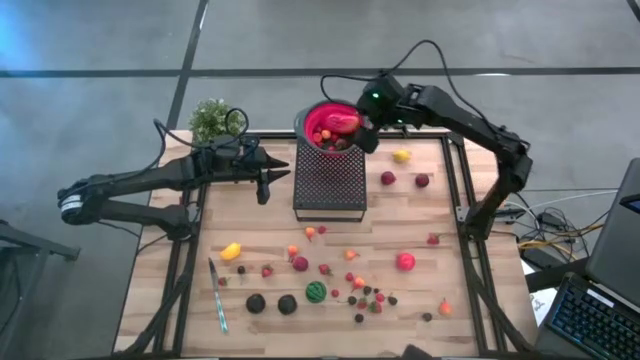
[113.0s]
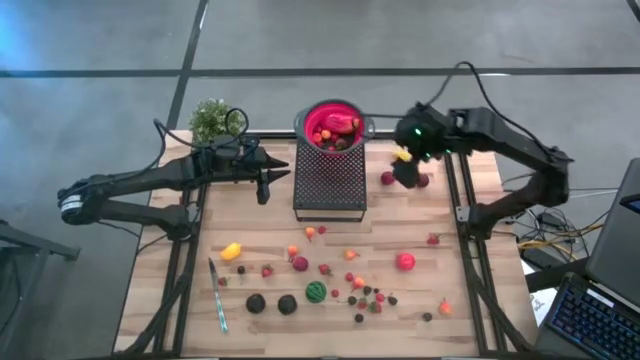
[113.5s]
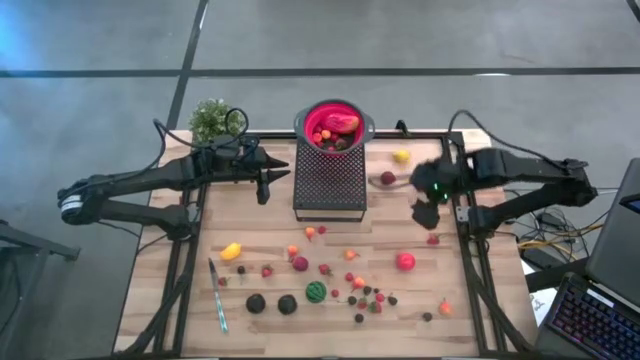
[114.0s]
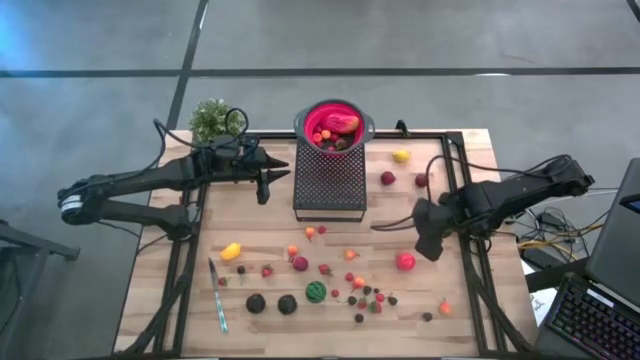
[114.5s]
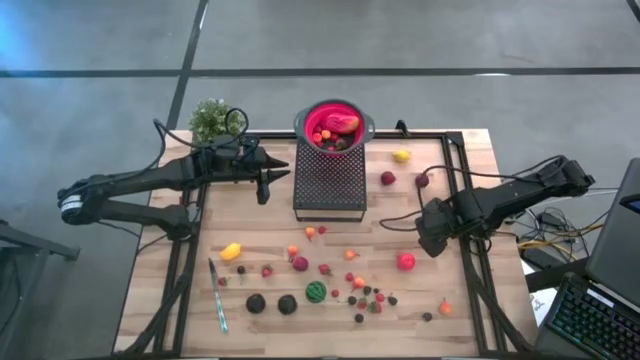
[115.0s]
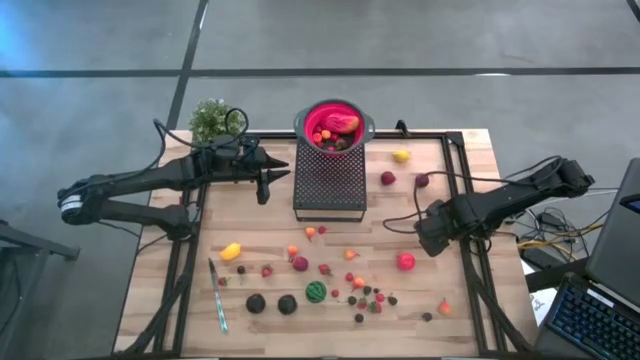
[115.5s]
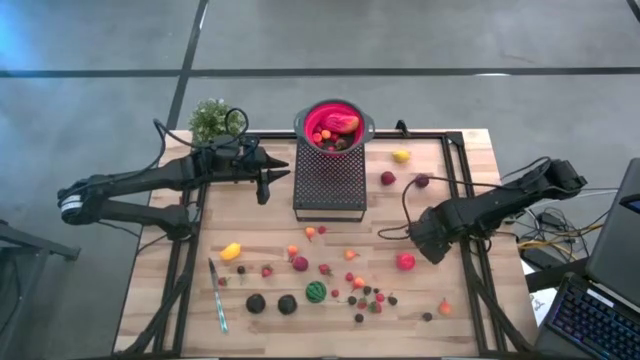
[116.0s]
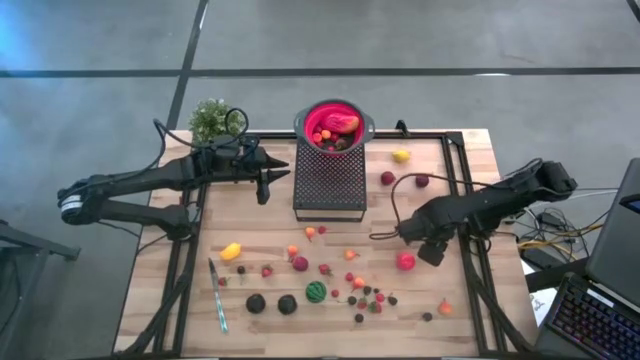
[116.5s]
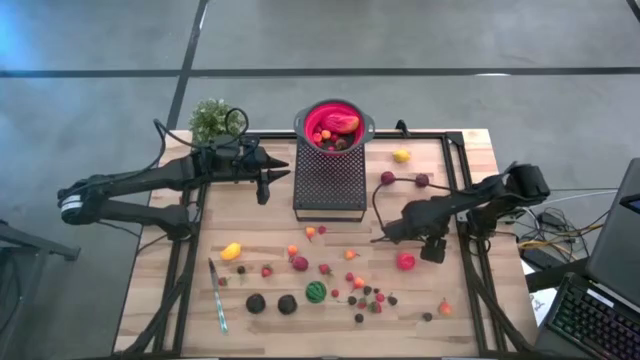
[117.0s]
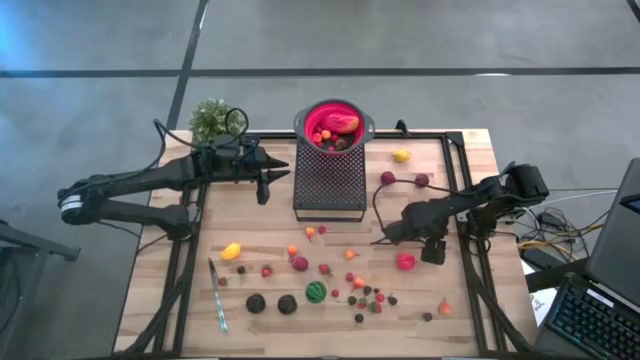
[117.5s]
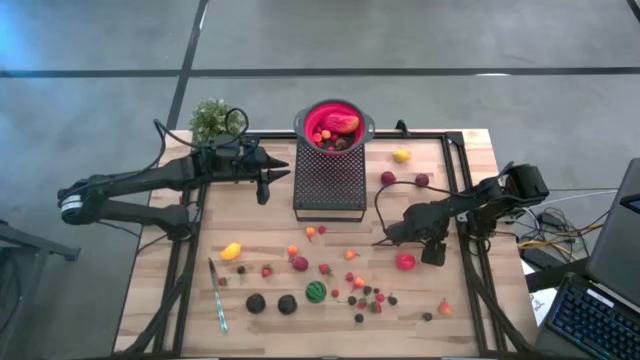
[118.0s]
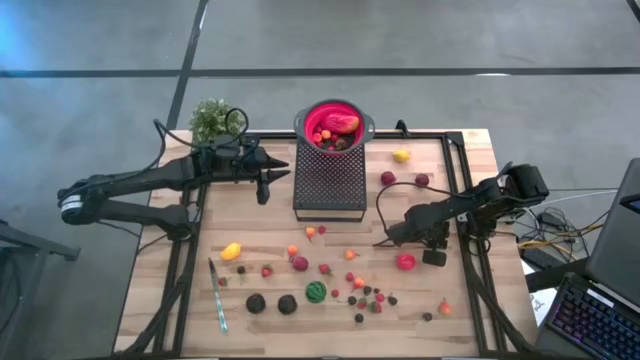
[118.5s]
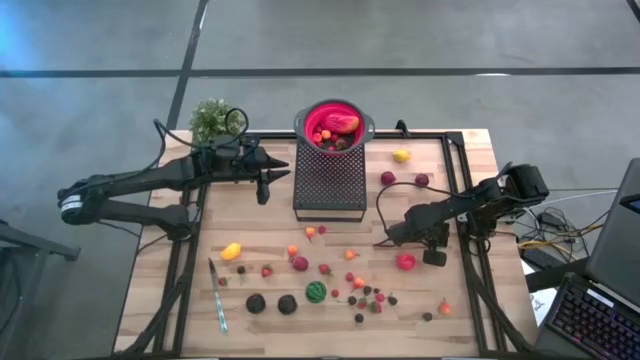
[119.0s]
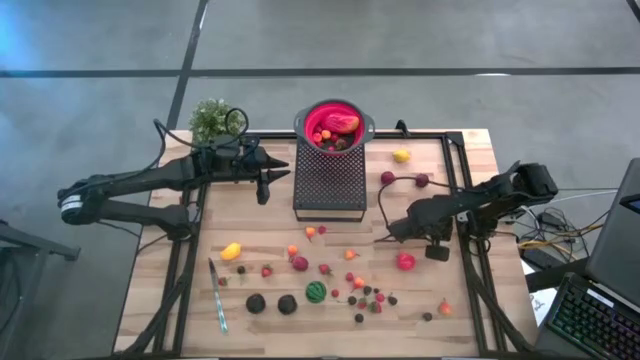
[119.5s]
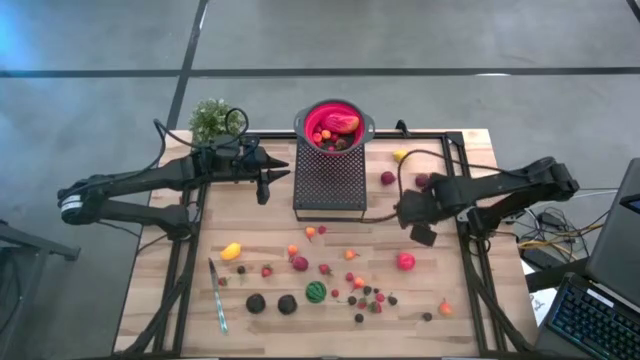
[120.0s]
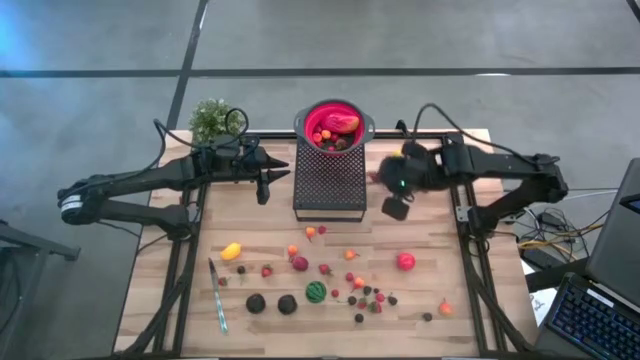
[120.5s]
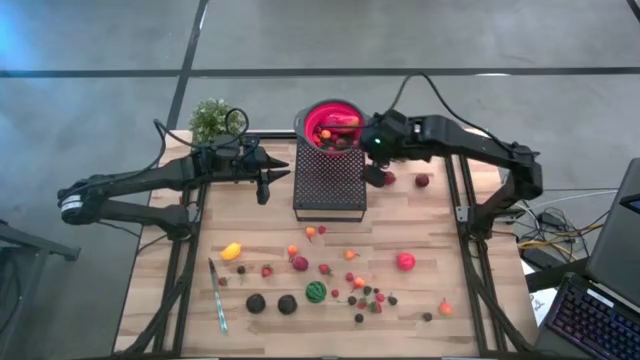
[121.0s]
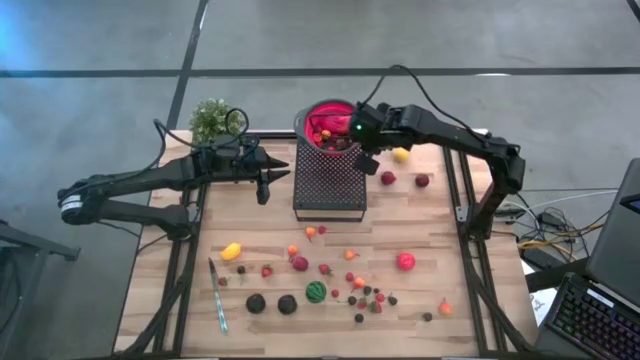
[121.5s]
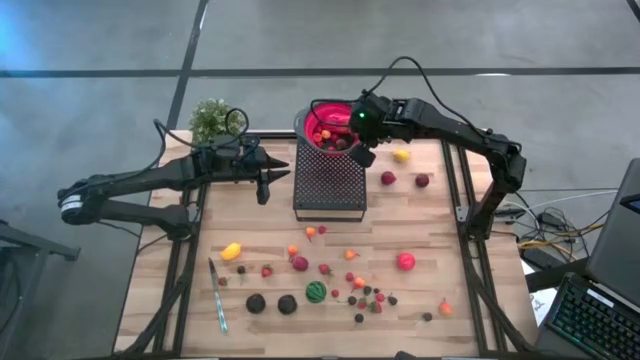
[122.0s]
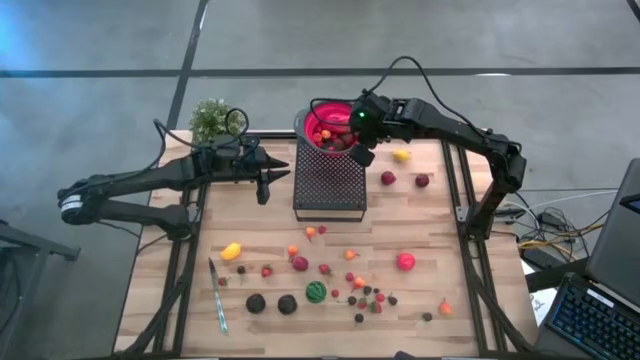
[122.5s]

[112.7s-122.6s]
Task: Pick & Place Fruit
Put the strawberry into the red strainer bowl on the shelf

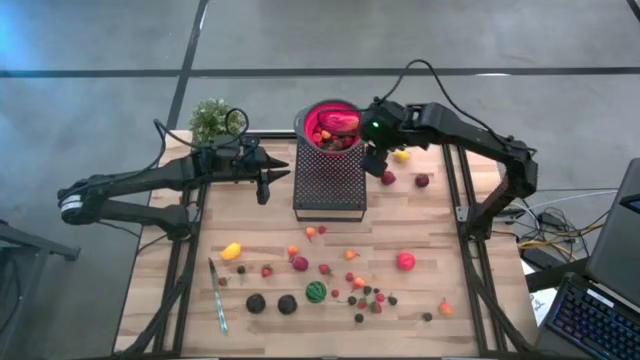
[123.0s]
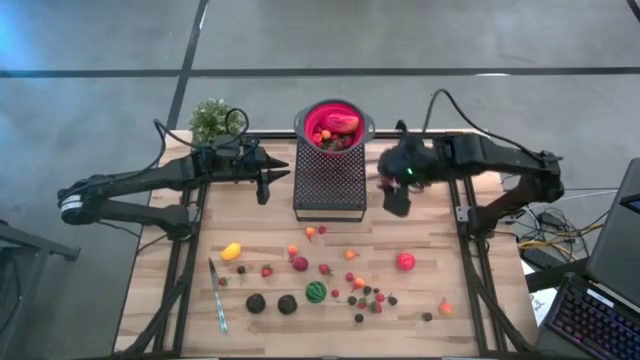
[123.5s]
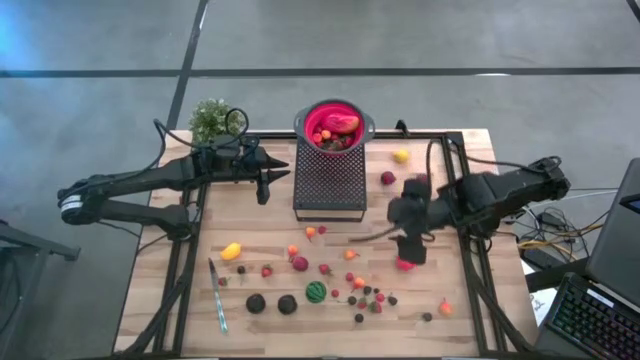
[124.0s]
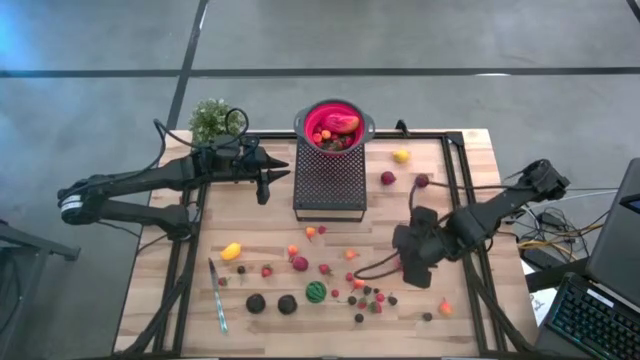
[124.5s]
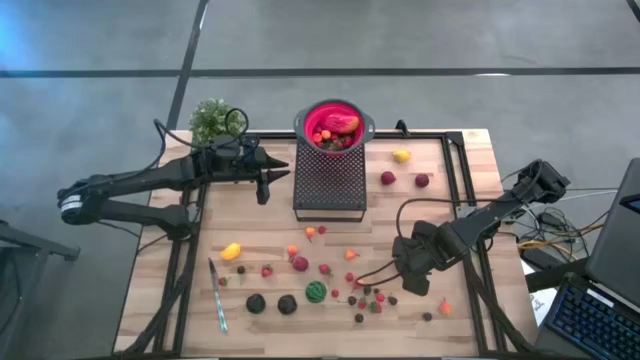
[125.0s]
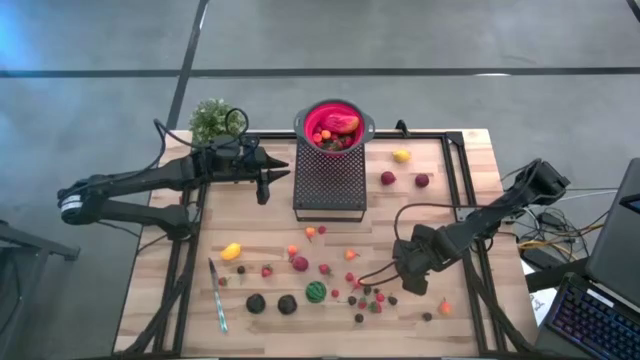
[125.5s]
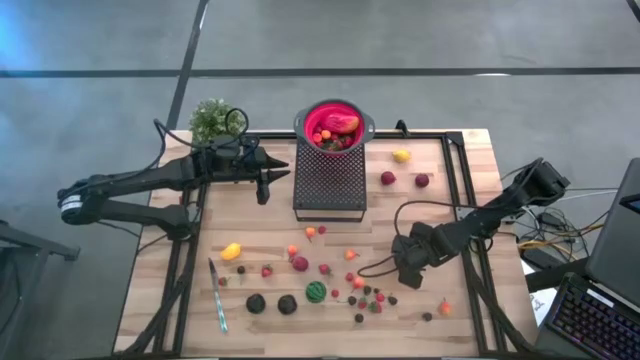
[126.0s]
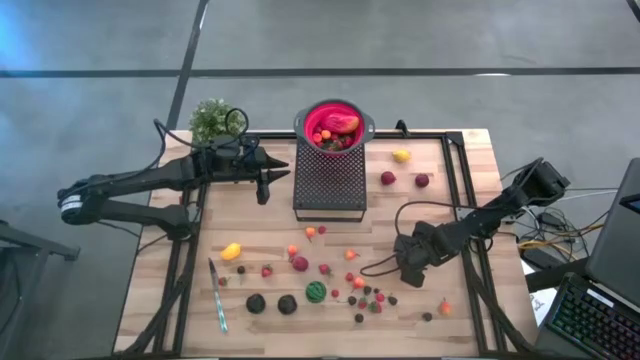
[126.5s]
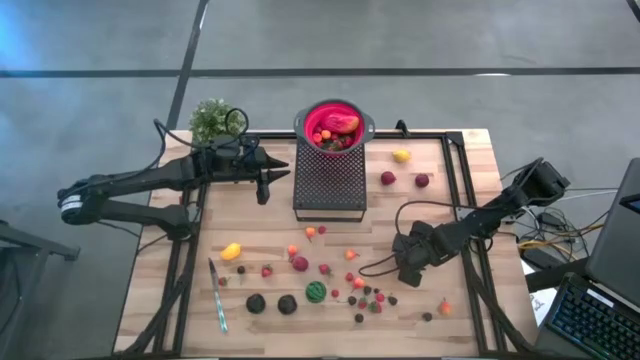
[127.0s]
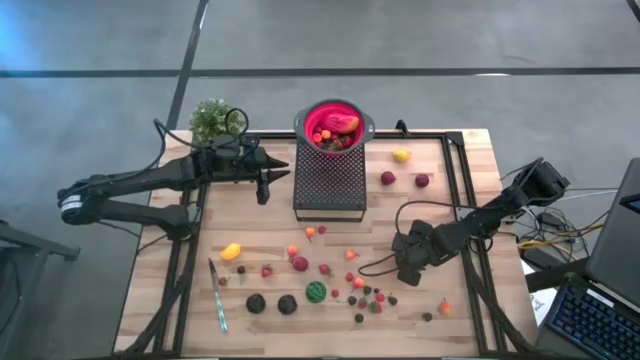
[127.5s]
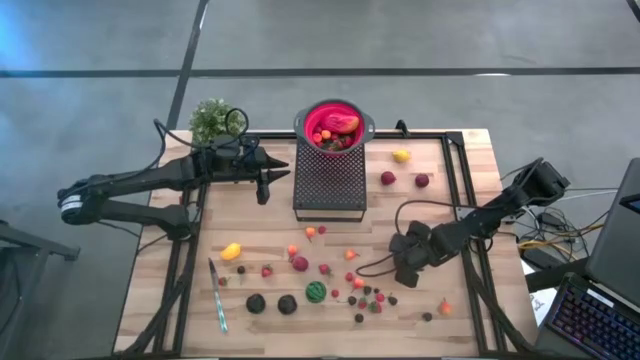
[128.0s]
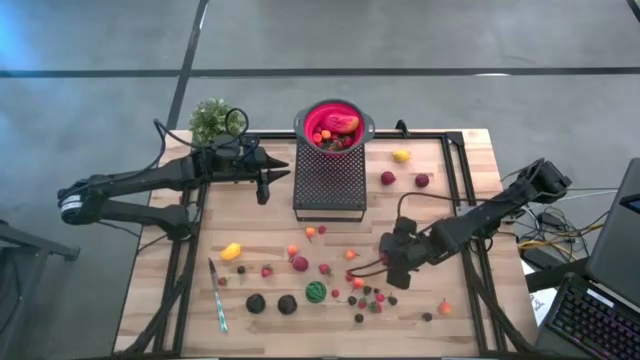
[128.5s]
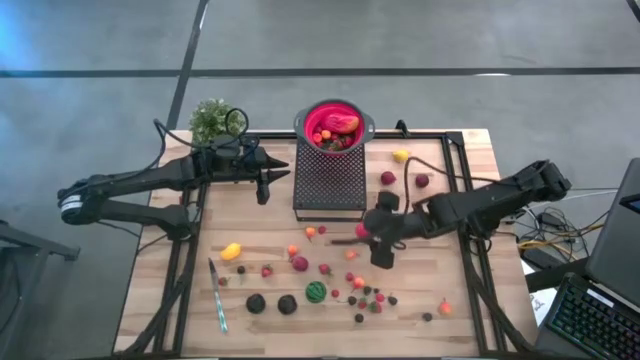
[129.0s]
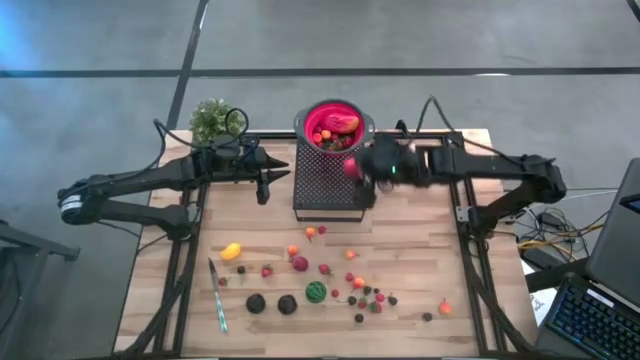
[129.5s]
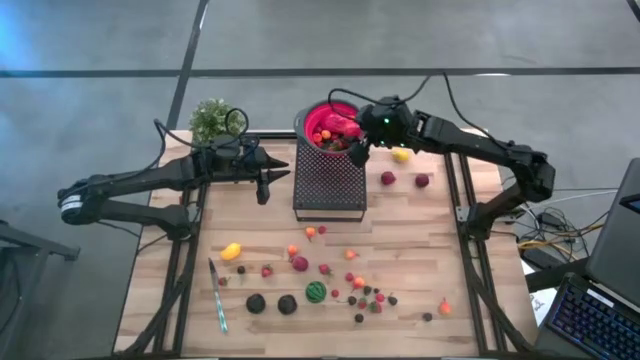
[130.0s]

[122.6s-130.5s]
Put the tomato into the red strainer bowl on the shelf

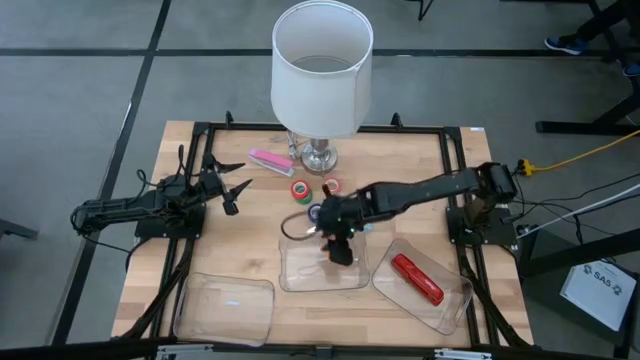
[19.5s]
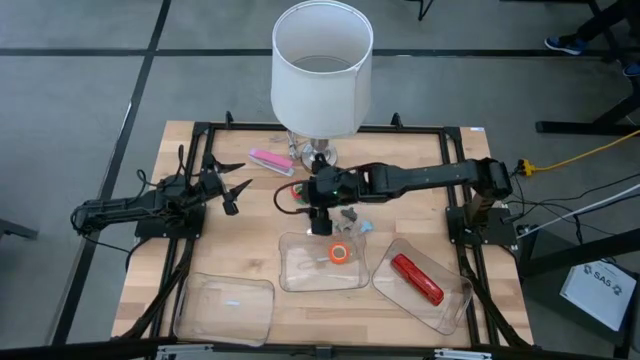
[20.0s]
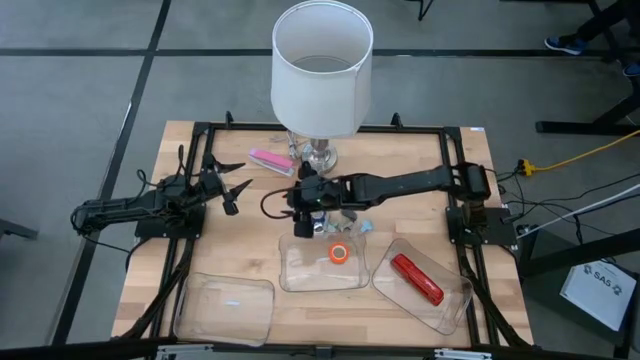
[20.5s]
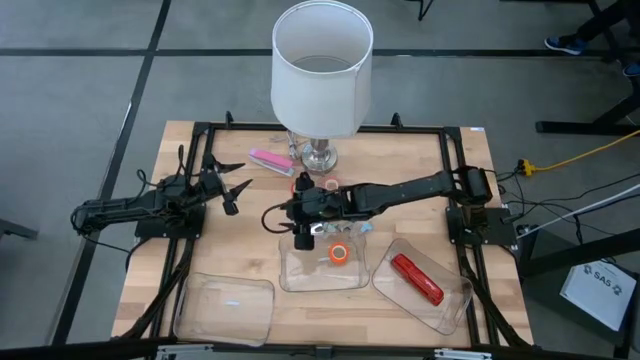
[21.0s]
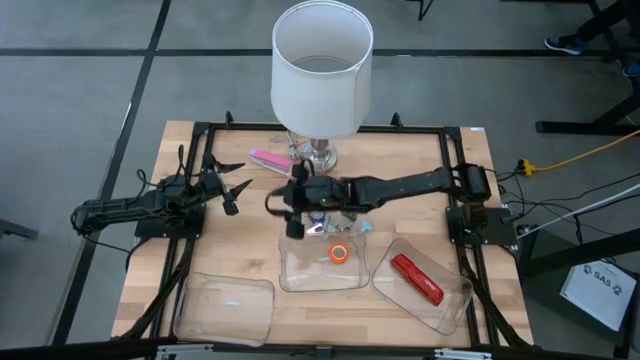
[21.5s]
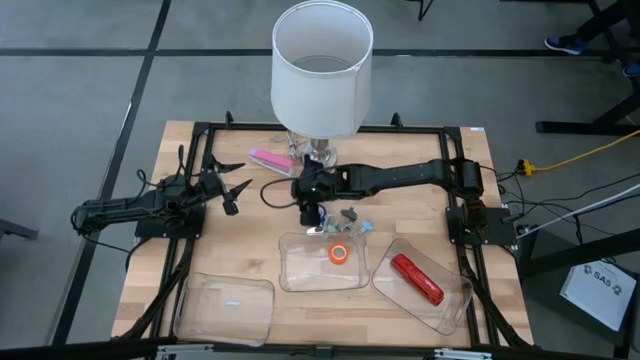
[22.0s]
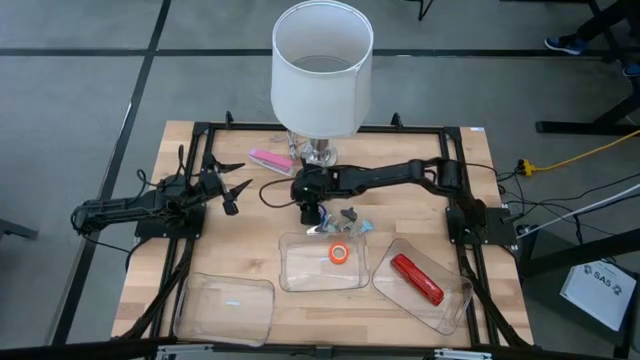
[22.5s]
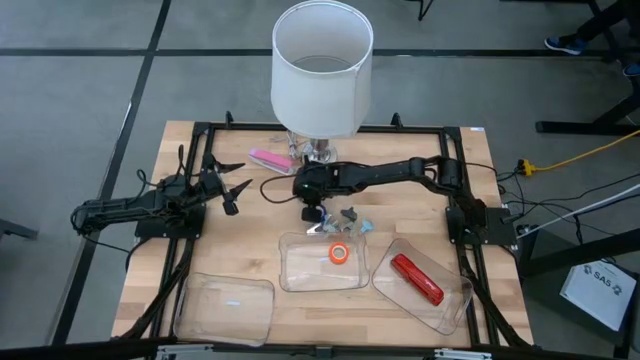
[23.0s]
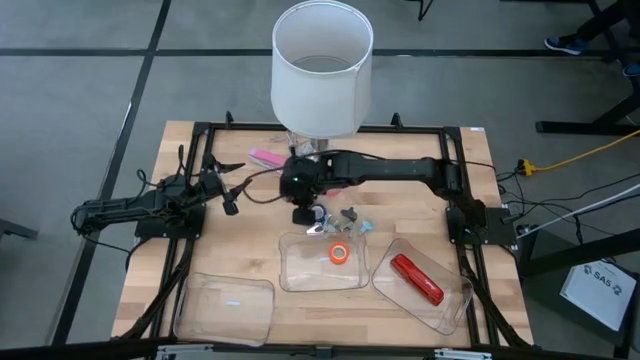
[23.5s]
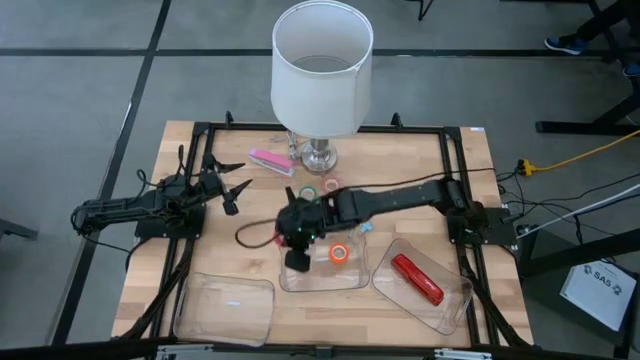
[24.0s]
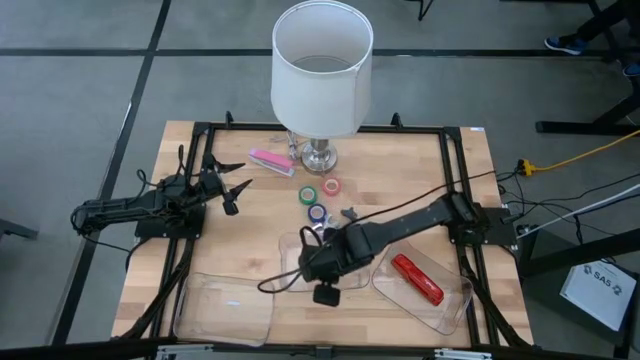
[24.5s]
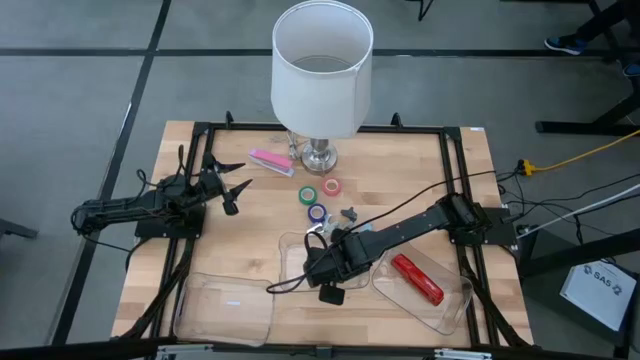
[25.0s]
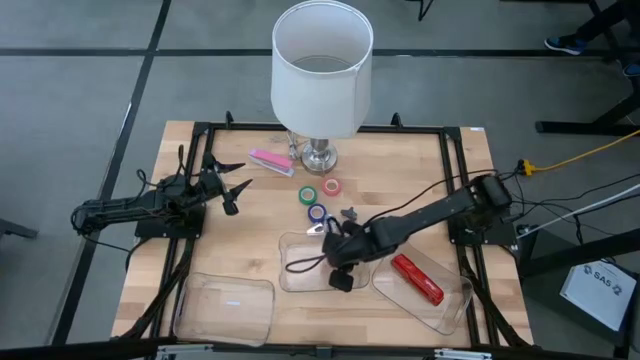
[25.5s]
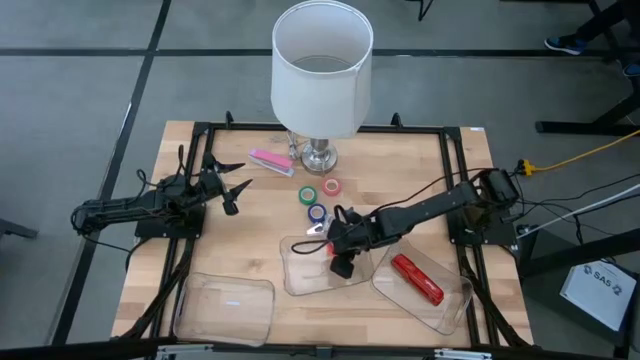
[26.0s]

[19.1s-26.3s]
Task: Pick and place Stapler, Stapler remover, tape
Put the red tape into the top transparent bin
